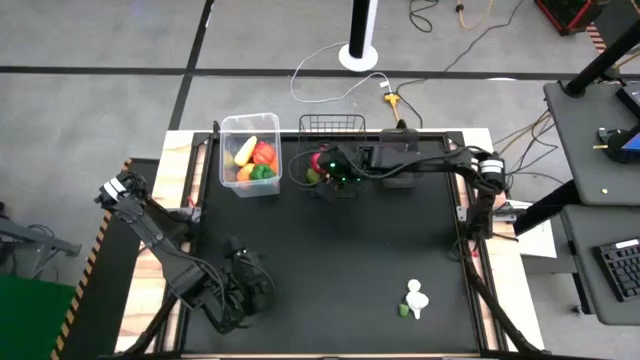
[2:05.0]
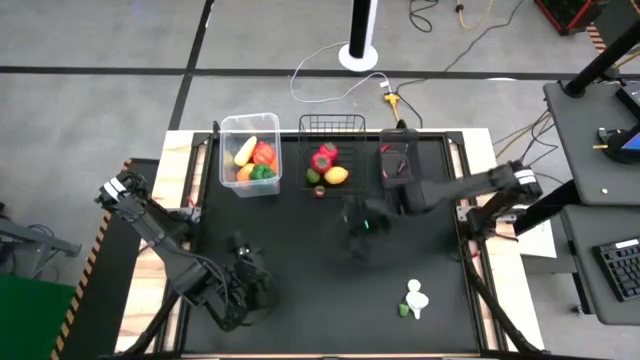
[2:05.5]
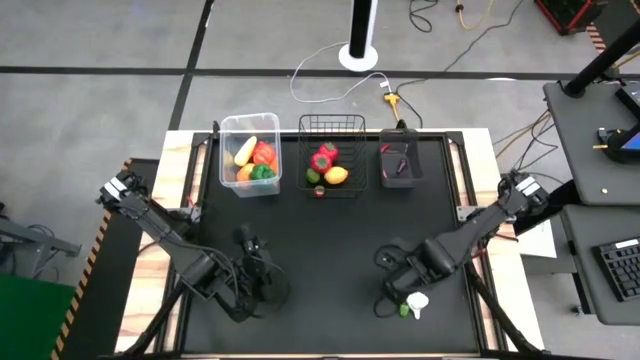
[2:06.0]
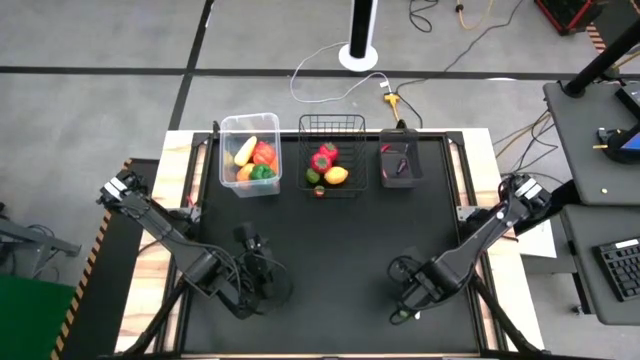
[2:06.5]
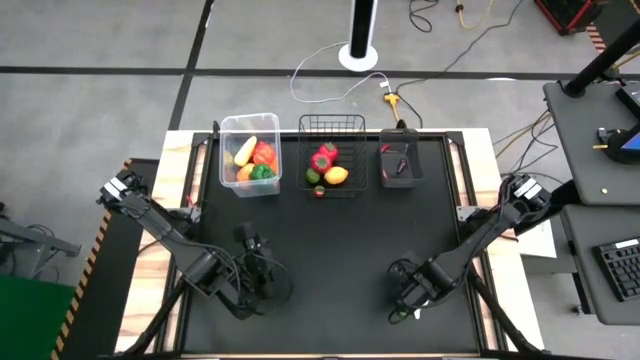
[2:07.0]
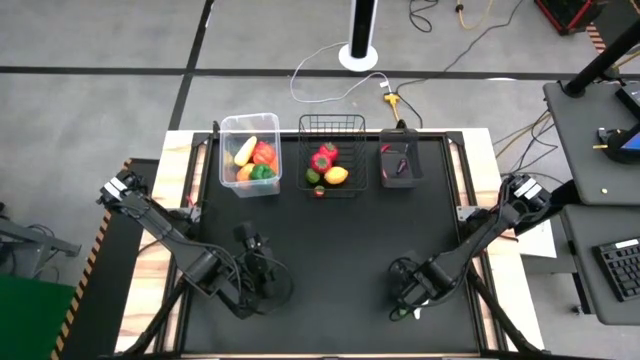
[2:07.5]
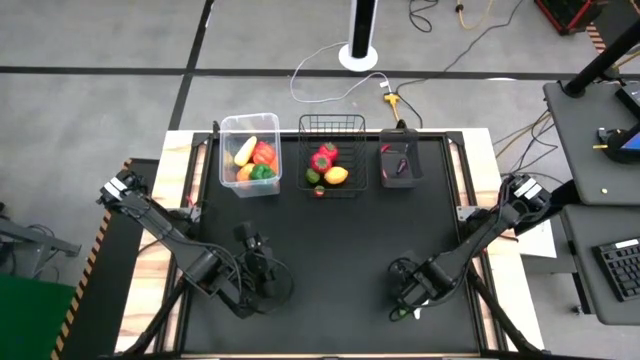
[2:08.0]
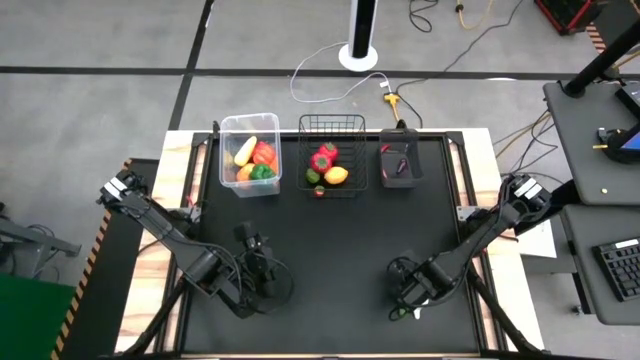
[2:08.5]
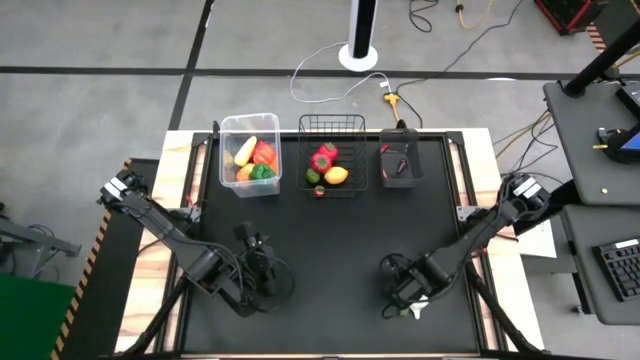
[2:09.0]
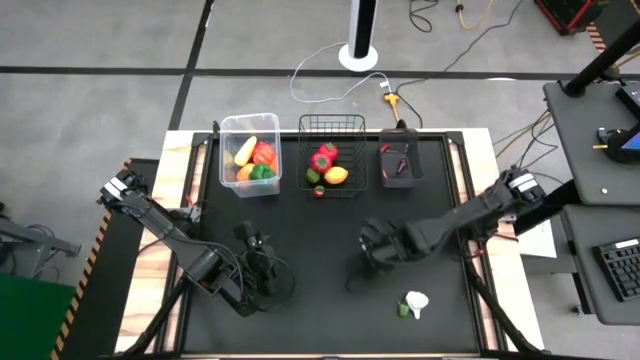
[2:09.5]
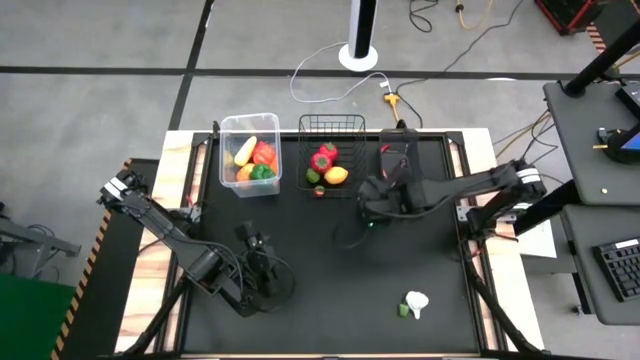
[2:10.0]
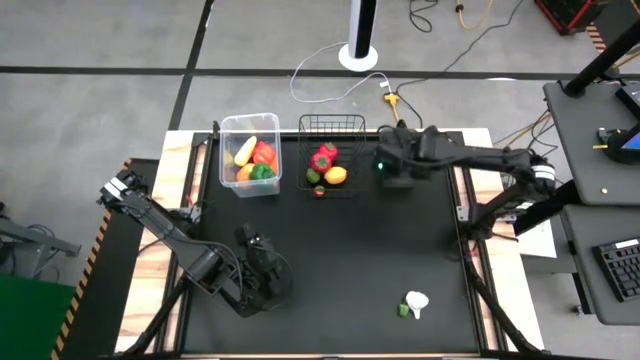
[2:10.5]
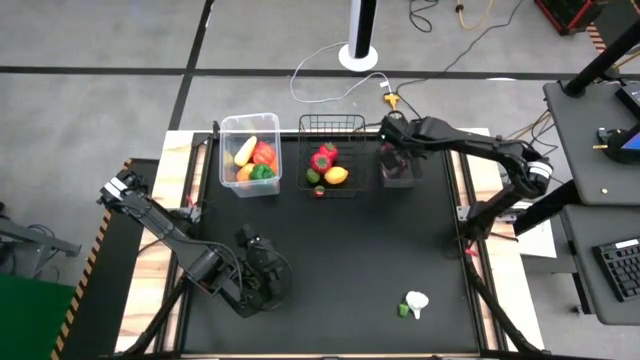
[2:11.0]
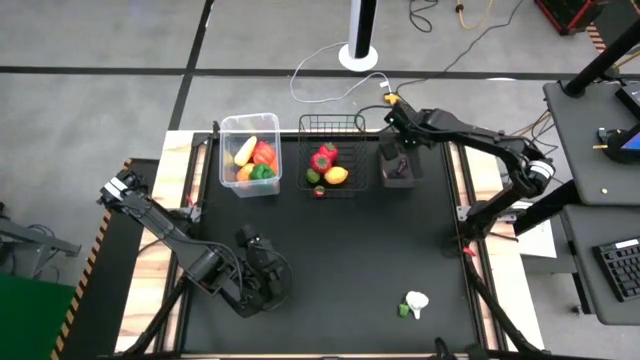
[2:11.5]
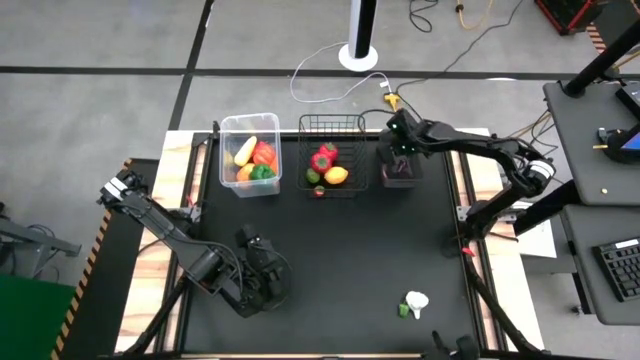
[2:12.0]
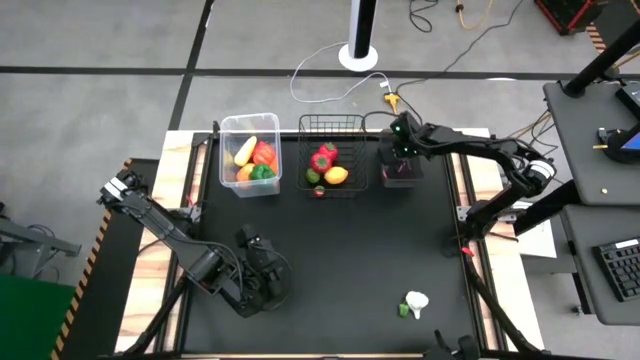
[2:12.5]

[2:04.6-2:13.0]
Task: Sort produce into baskets
Put the small white garlic into the black basket

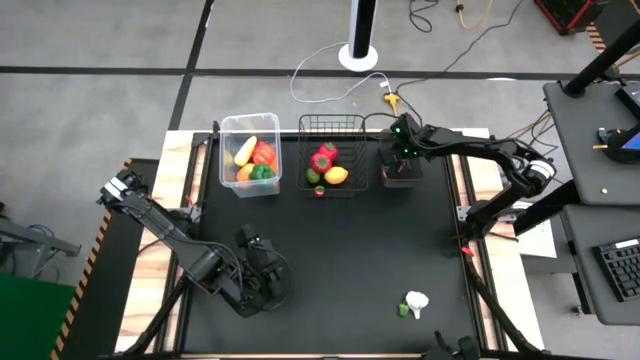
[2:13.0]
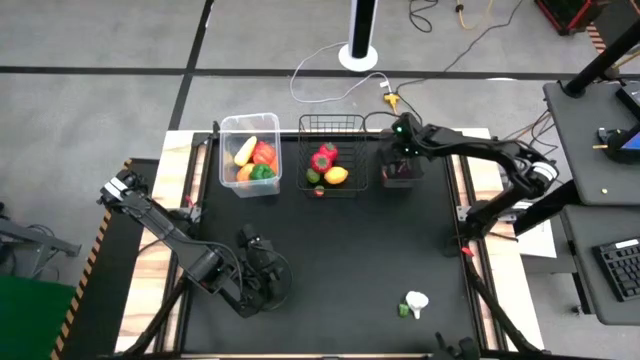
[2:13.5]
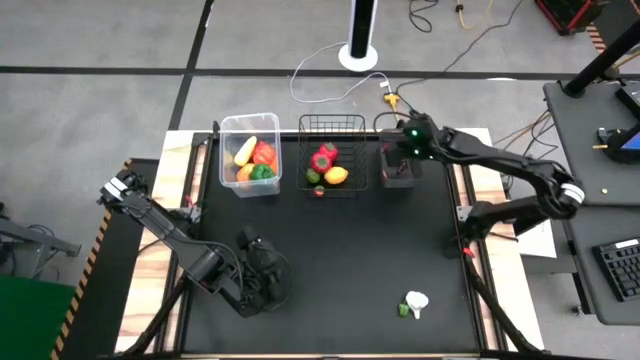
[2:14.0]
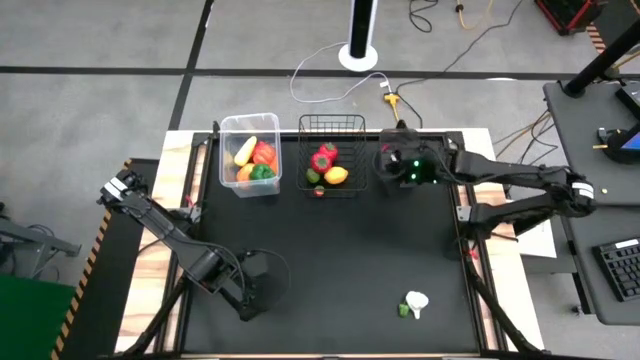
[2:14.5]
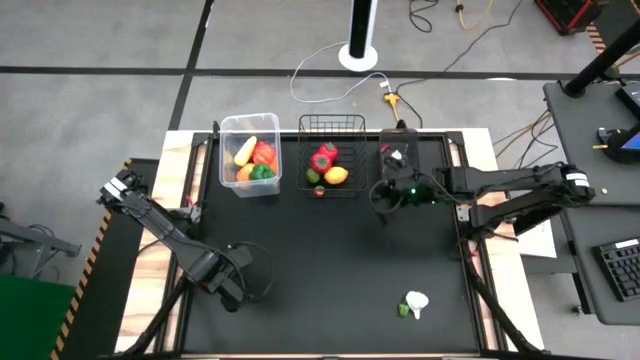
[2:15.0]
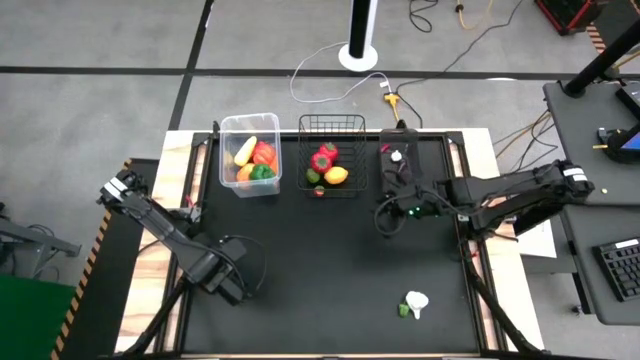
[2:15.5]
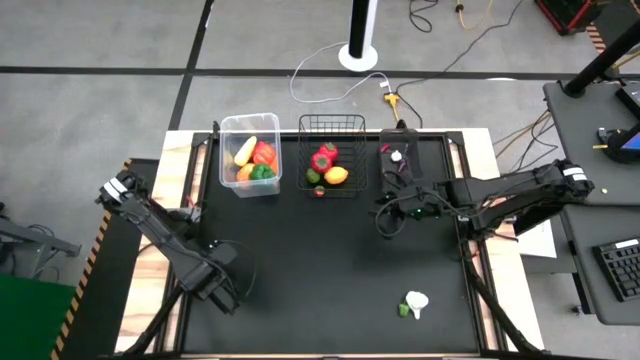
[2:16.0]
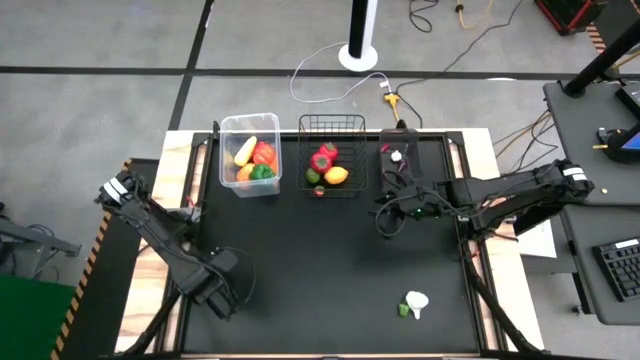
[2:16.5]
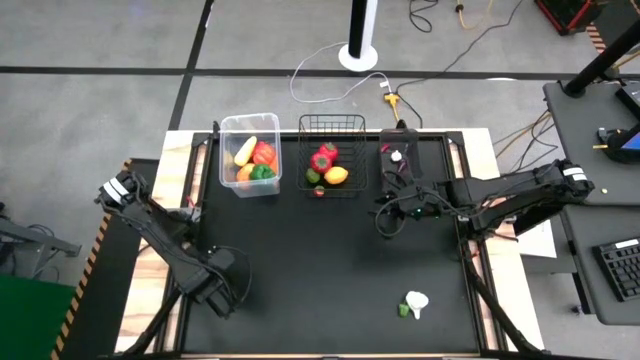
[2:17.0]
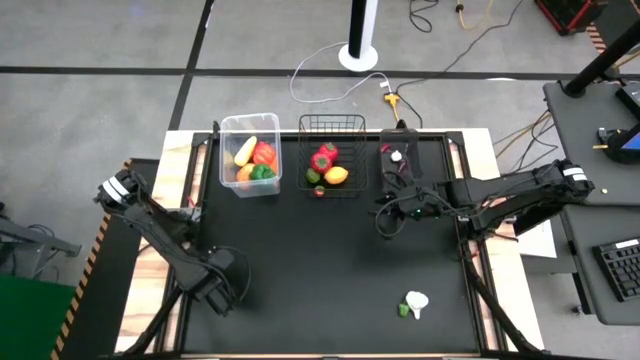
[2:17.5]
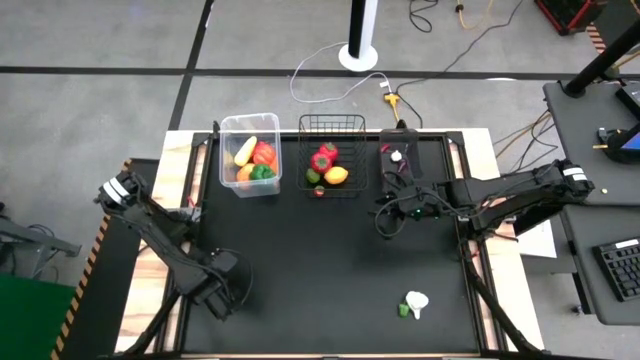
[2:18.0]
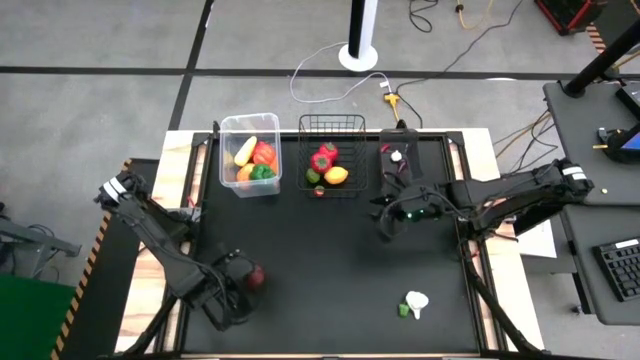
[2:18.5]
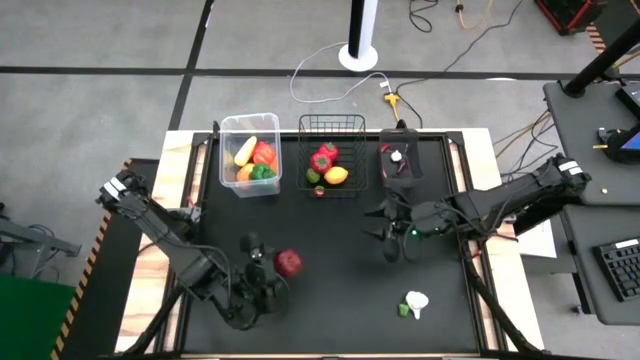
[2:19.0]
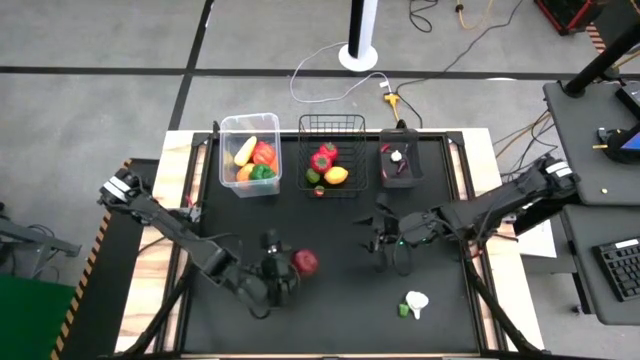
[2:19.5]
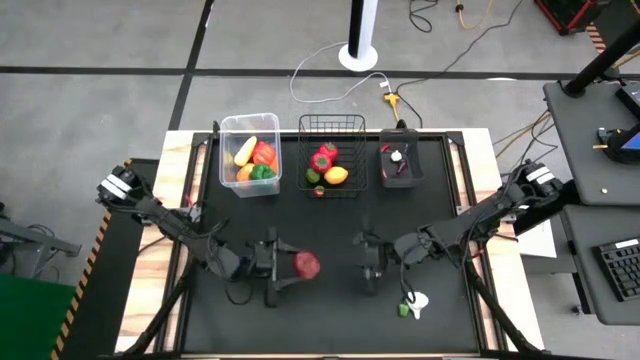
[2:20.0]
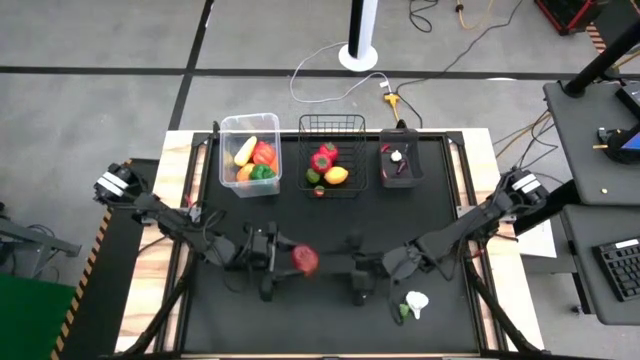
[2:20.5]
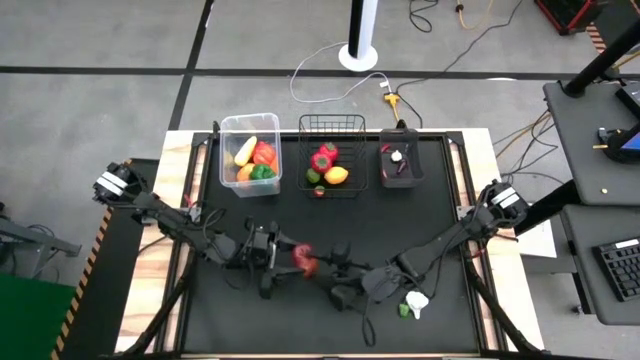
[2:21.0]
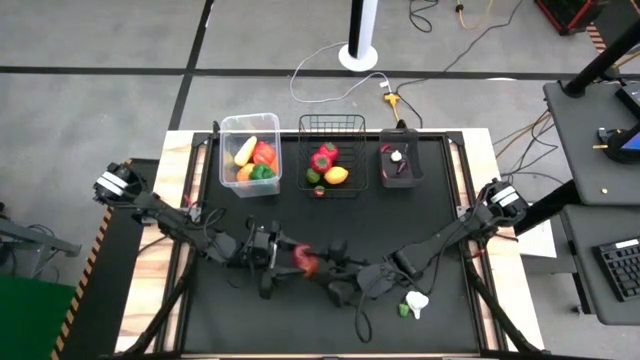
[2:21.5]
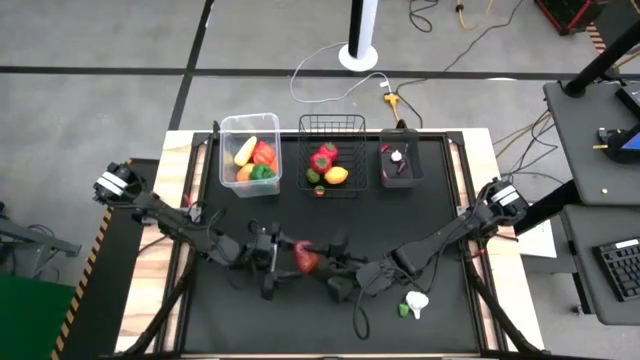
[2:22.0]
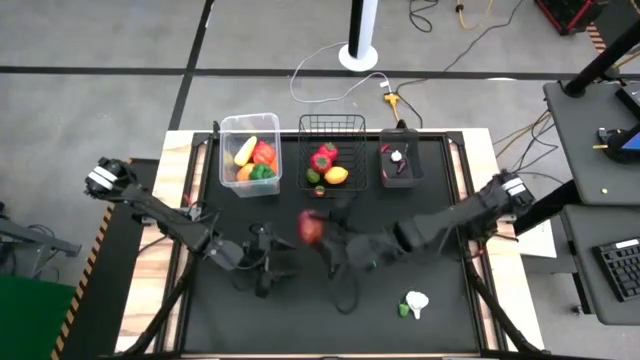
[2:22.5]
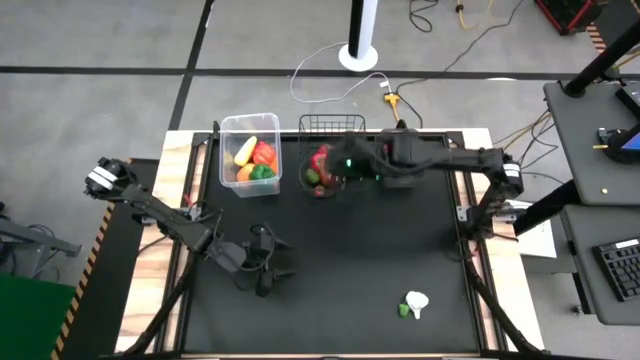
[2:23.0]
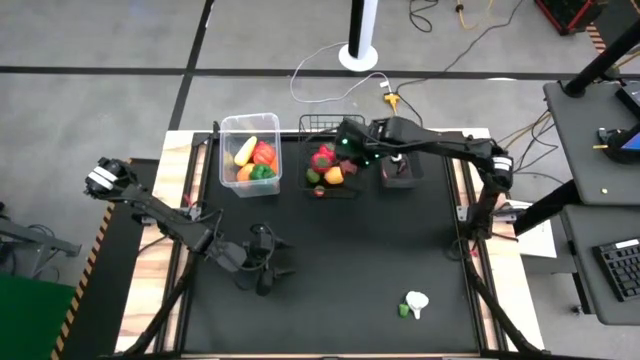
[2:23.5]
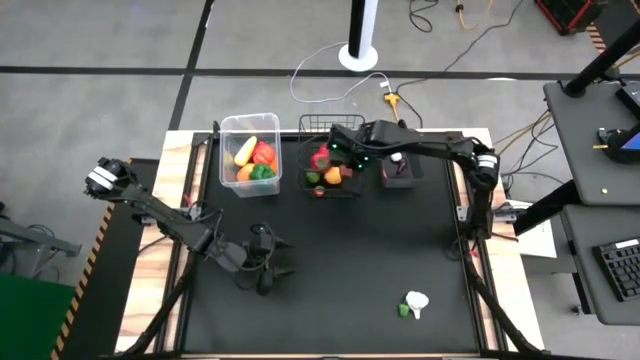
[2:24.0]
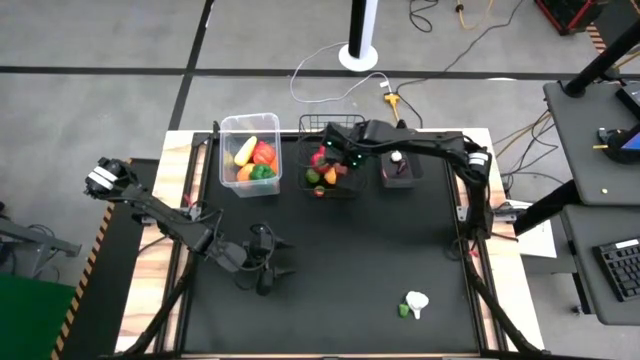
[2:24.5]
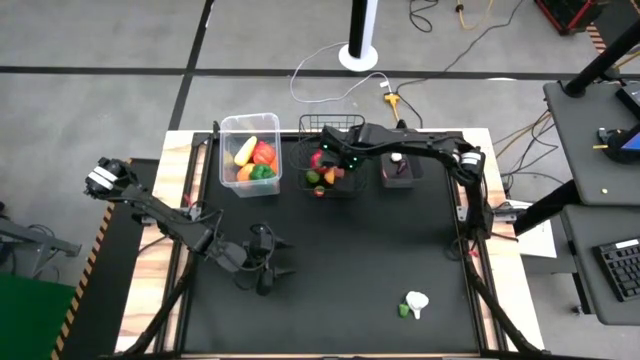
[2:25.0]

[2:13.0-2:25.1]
Put the red apple into the wire basket

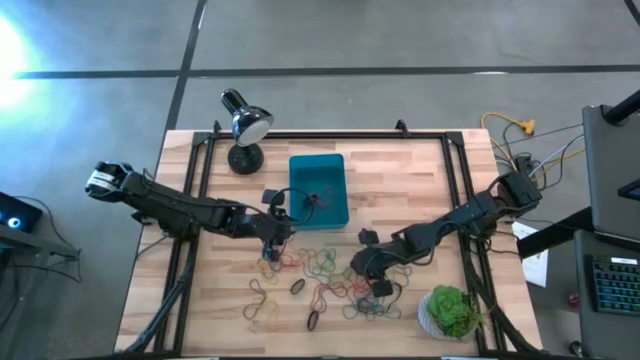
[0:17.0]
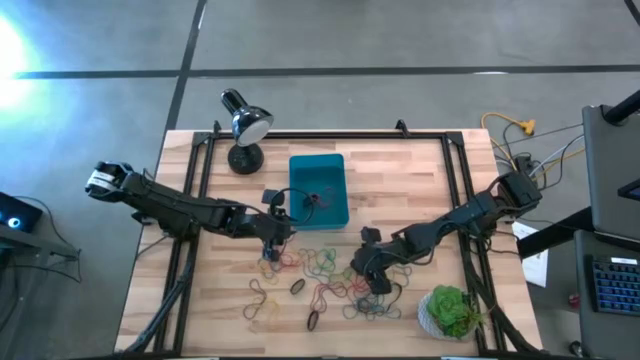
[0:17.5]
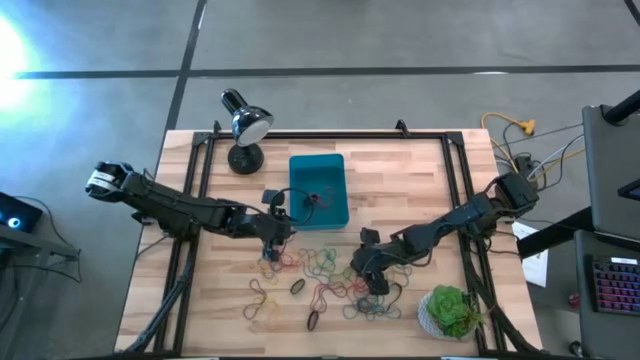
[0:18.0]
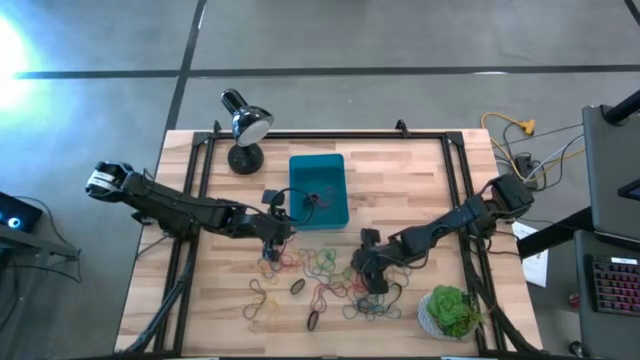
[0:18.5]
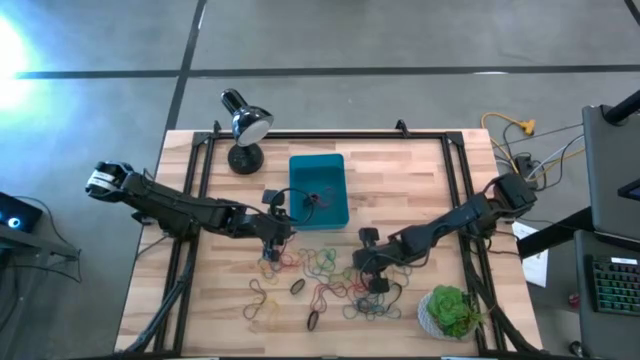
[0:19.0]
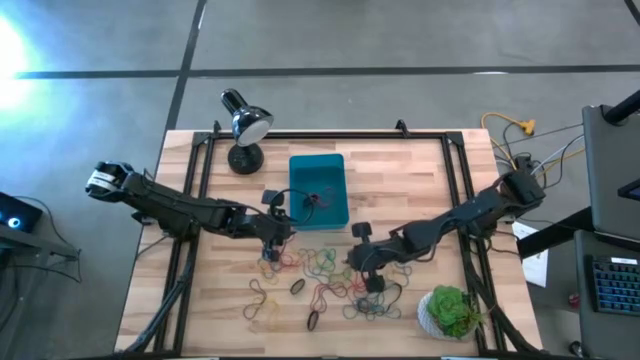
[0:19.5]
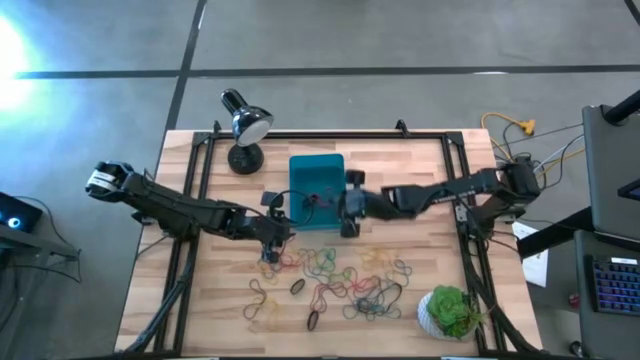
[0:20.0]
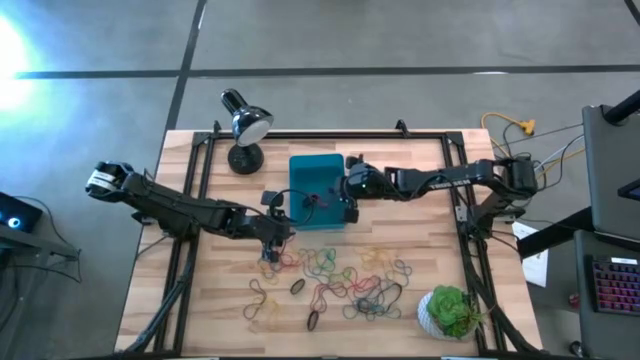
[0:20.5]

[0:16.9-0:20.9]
Task: Pick and place rubber bands into bin
Put the black rubber band into the blue bin
